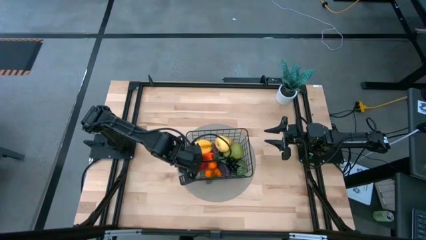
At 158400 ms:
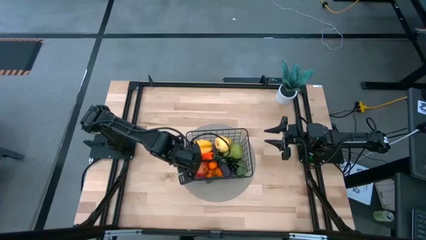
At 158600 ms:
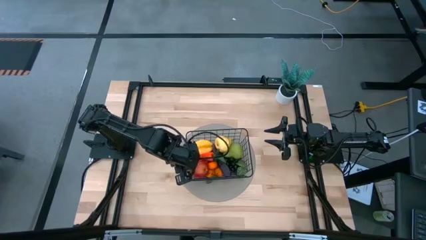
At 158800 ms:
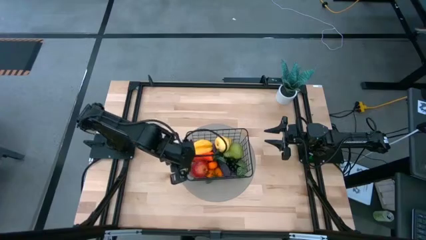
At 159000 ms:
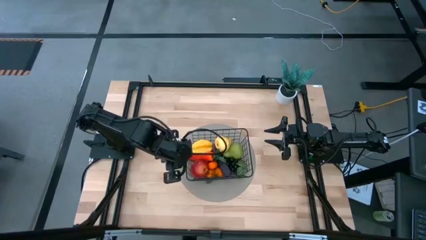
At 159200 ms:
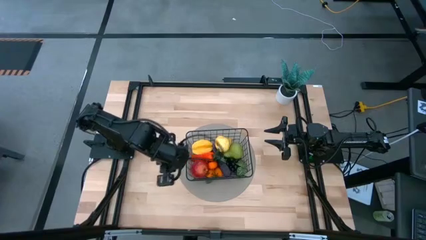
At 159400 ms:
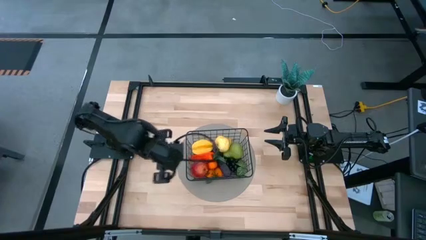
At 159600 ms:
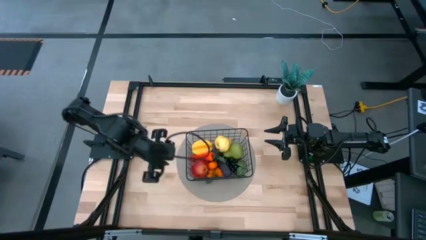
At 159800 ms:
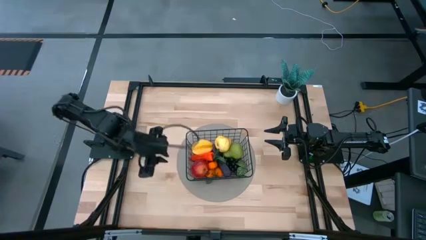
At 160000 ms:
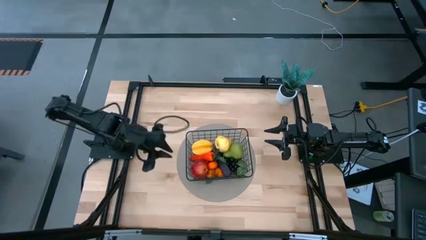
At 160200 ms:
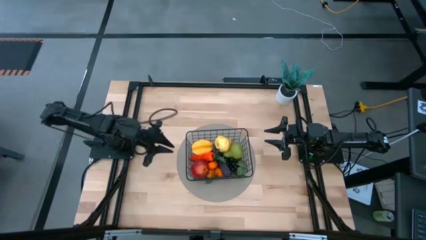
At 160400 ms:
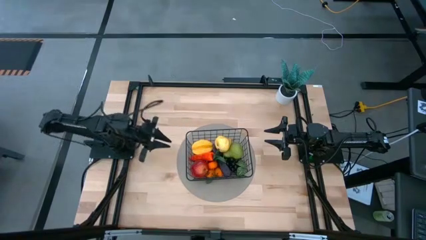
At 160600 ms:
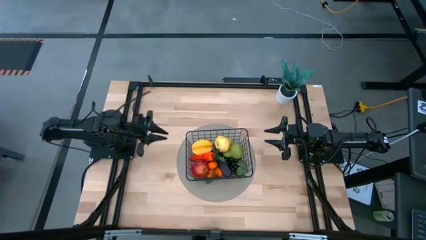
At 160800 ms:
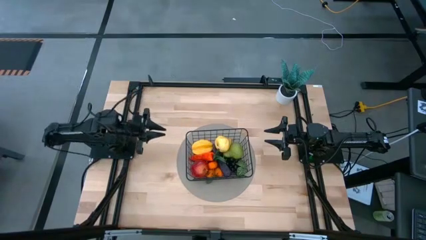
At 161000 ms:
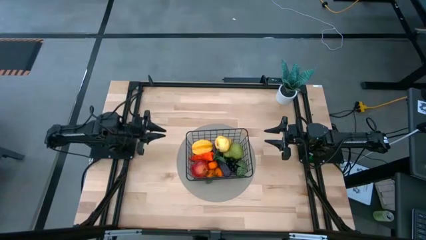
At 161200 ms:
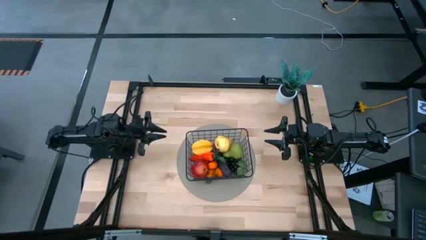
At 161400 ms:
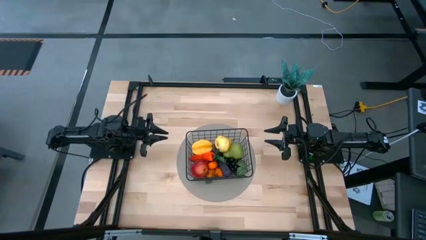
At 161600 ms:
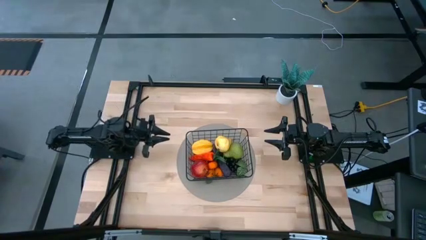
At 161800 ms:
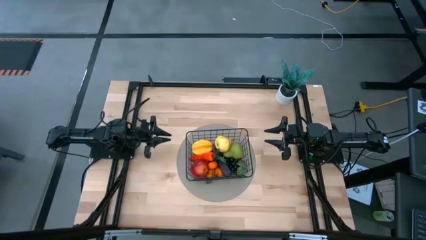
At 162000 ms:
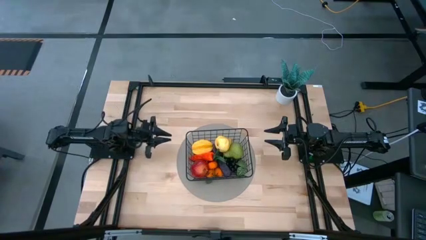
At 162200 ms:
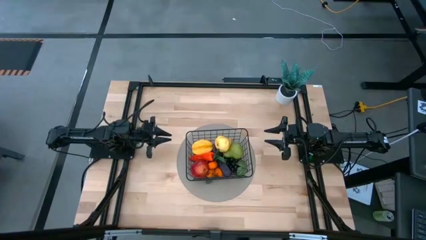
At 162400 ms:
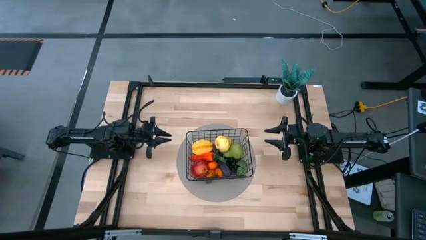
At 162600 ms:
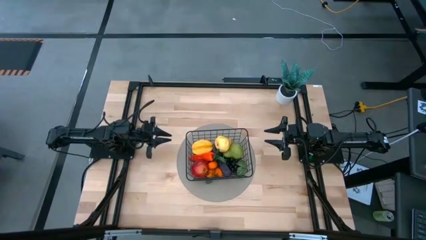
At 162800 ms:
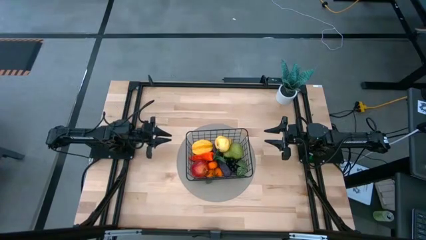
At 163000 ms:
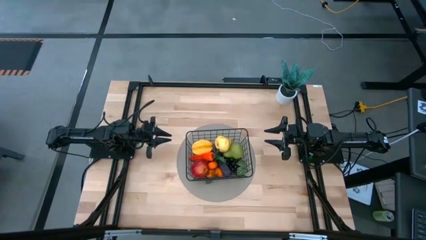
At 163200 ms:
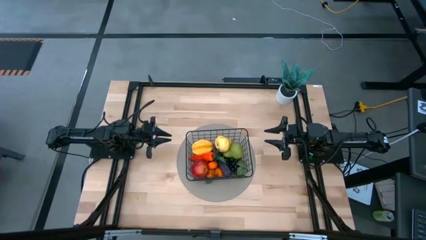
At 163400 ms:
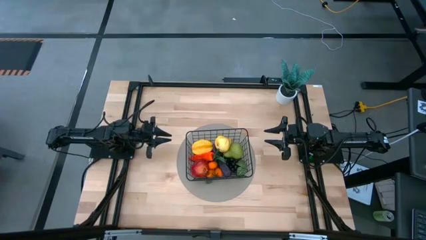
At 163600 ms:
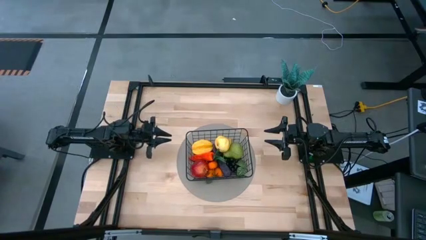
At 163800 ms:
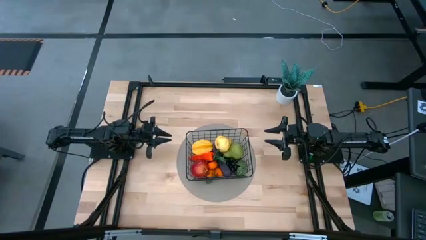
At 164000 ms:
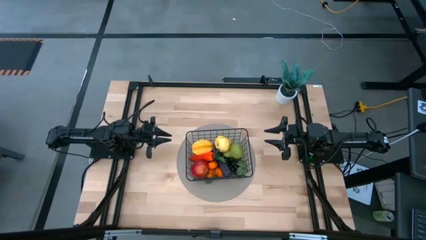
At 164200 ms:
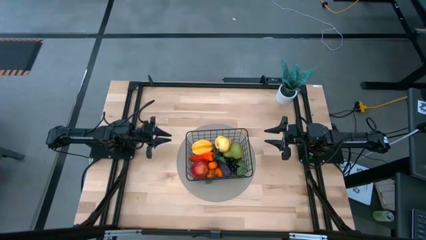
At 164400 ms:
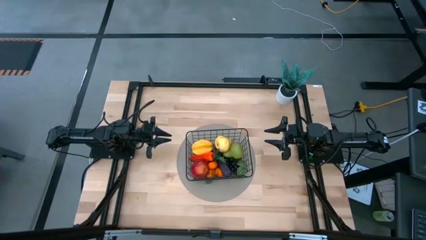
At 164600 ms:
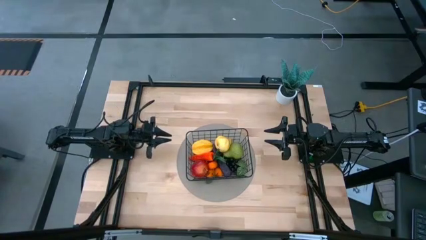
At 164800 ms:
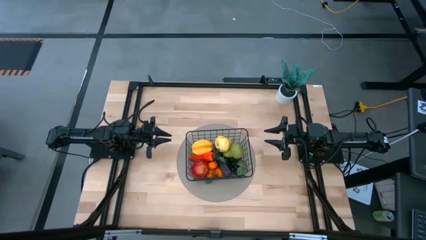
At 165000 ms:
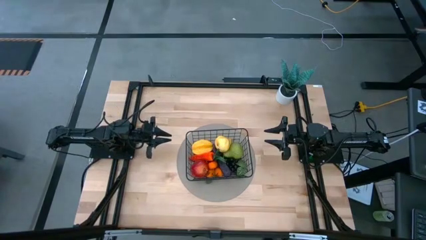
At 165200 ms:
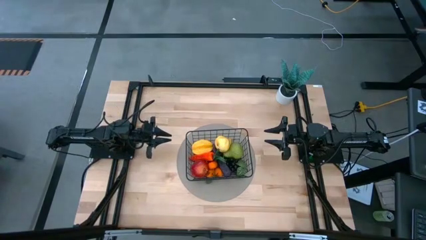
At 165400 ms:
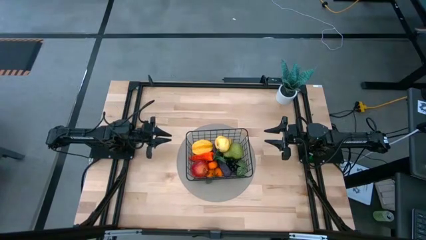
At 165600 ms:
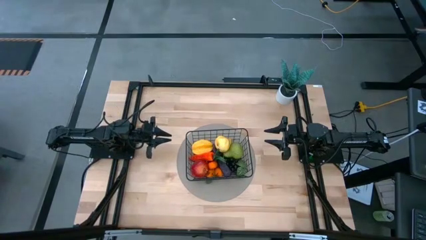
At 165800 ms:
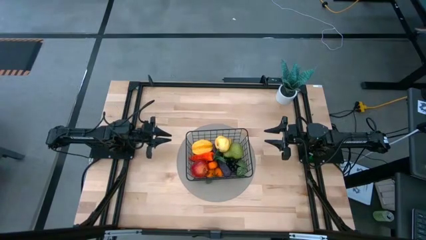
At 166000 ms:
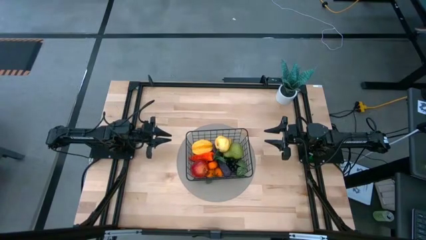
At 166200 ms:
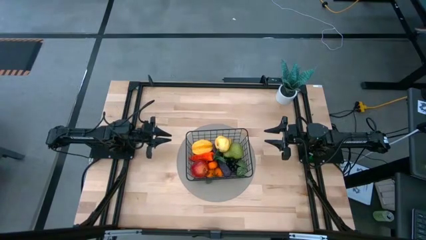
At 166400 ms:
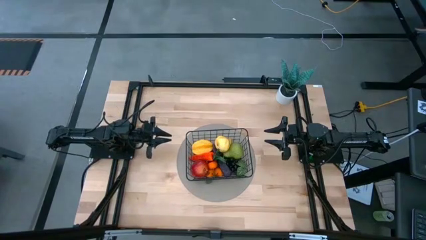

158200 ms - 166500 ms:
Task: Build produce basket
Return to Home Position

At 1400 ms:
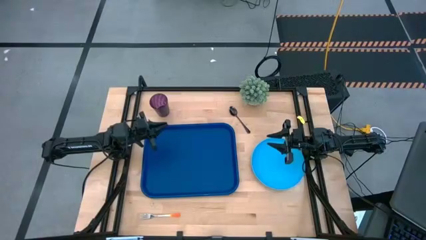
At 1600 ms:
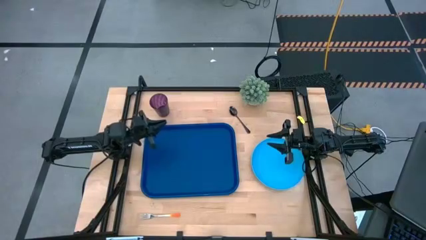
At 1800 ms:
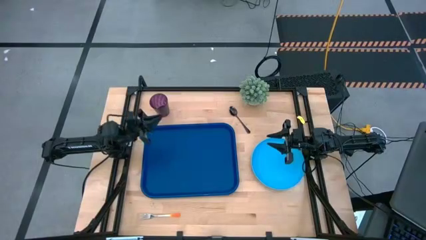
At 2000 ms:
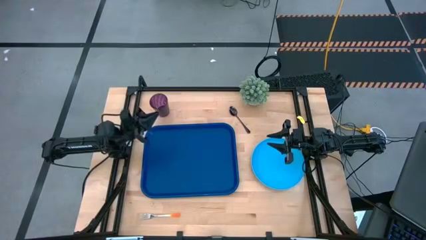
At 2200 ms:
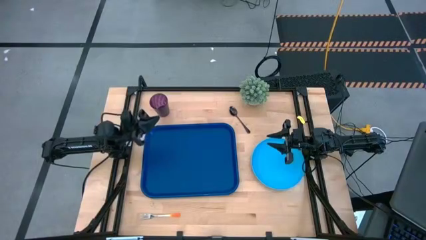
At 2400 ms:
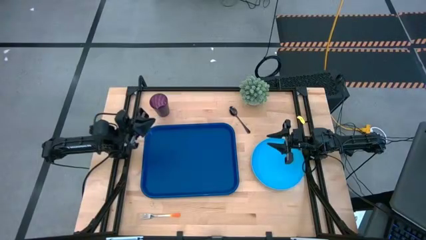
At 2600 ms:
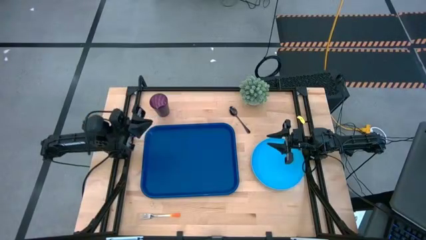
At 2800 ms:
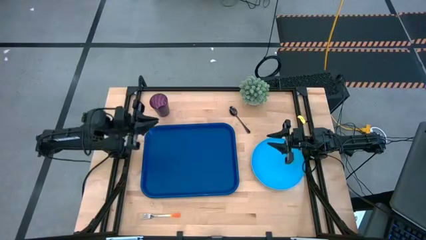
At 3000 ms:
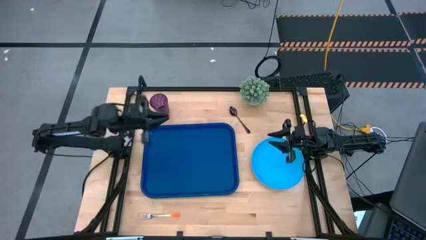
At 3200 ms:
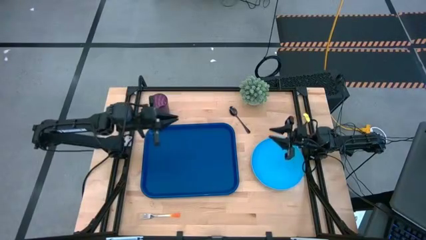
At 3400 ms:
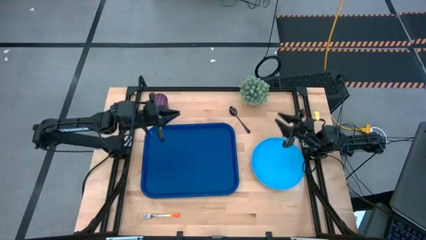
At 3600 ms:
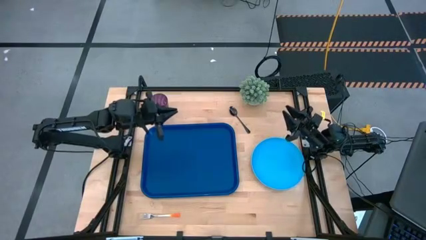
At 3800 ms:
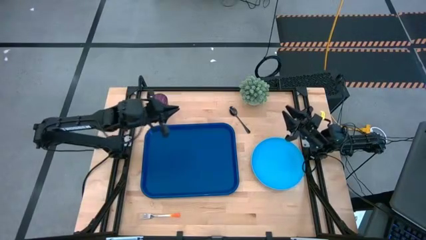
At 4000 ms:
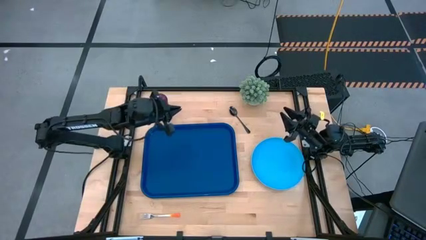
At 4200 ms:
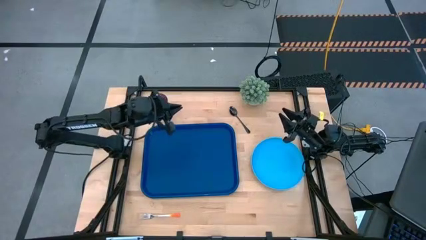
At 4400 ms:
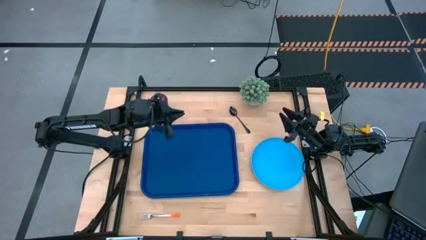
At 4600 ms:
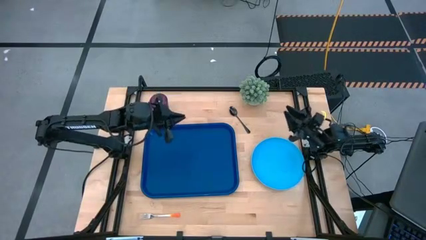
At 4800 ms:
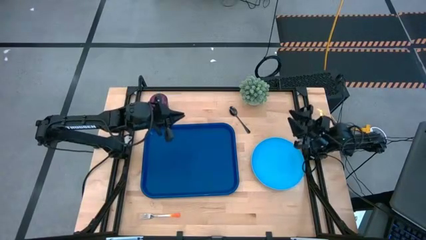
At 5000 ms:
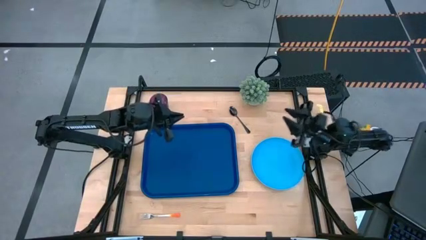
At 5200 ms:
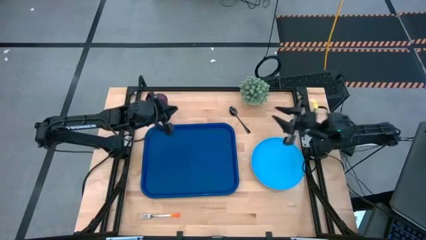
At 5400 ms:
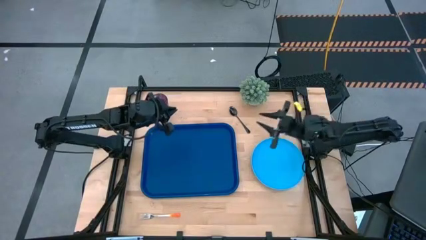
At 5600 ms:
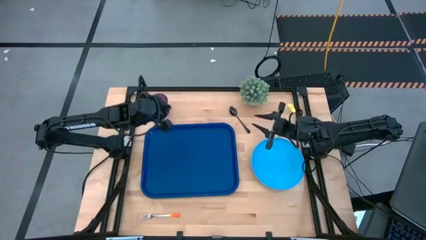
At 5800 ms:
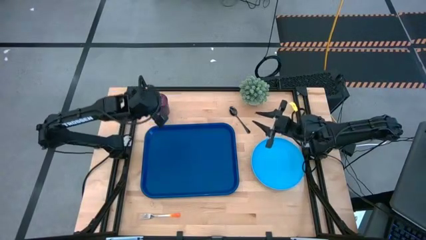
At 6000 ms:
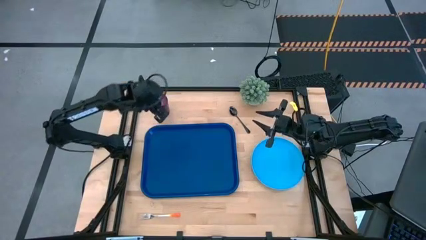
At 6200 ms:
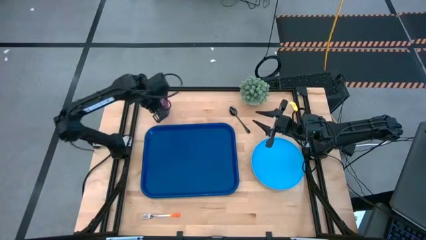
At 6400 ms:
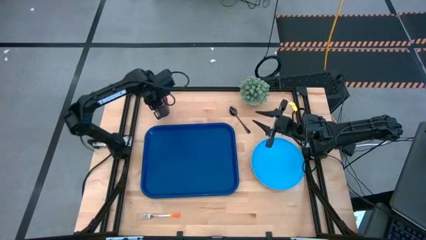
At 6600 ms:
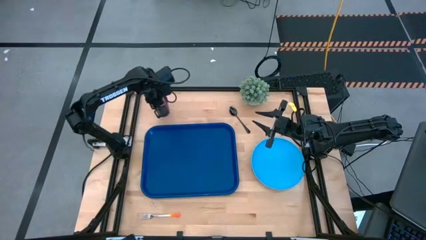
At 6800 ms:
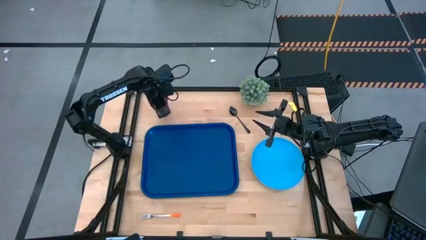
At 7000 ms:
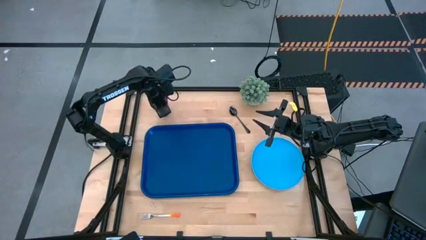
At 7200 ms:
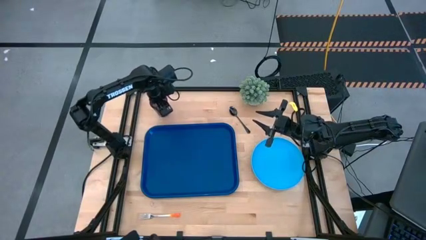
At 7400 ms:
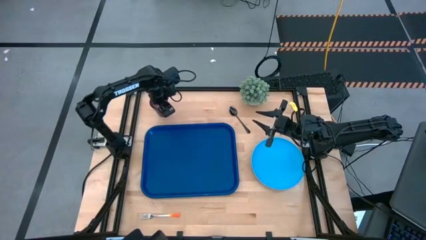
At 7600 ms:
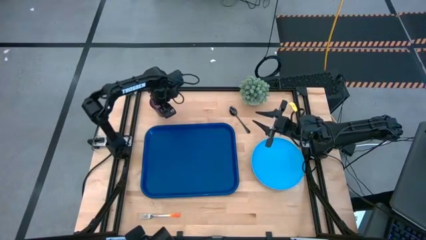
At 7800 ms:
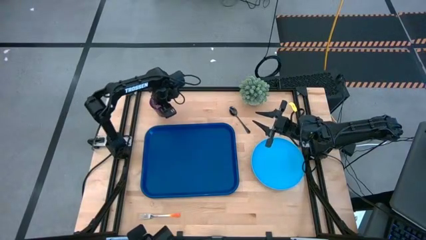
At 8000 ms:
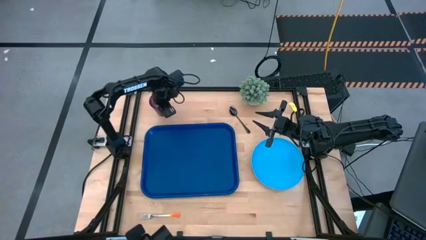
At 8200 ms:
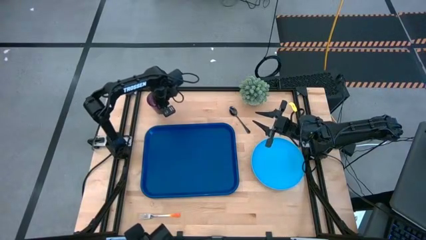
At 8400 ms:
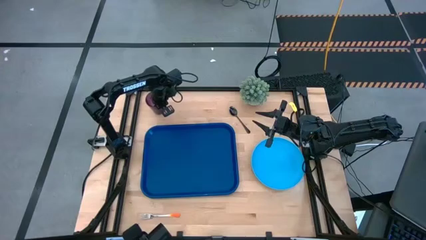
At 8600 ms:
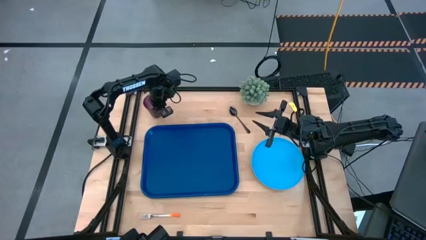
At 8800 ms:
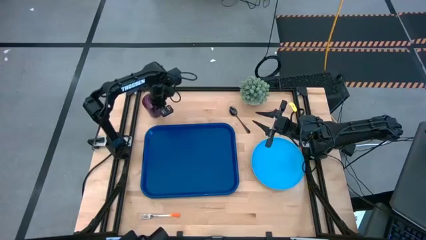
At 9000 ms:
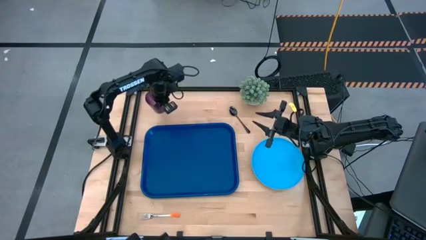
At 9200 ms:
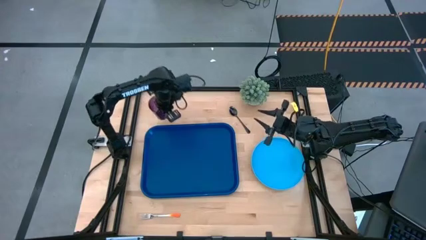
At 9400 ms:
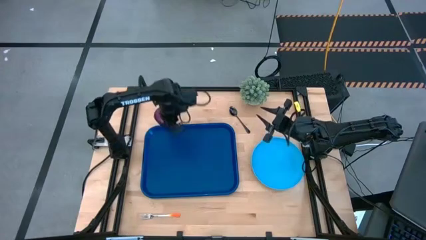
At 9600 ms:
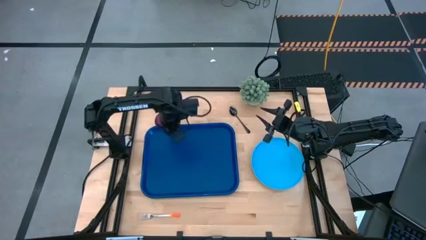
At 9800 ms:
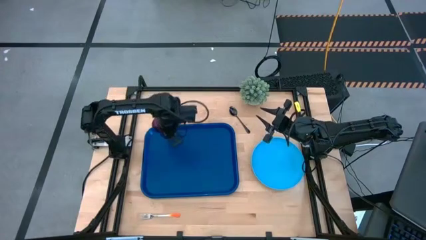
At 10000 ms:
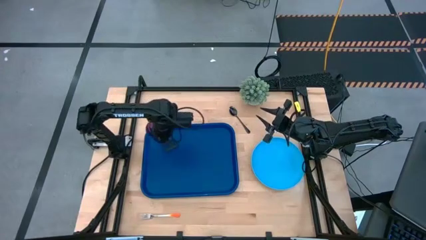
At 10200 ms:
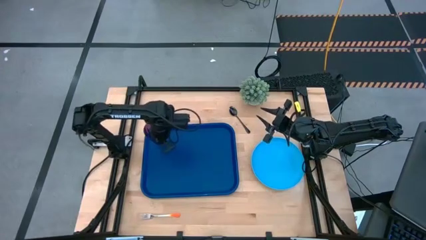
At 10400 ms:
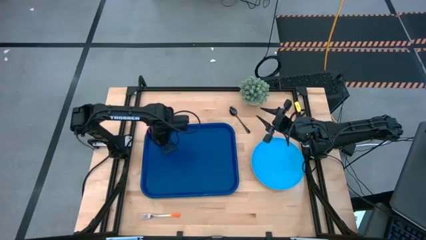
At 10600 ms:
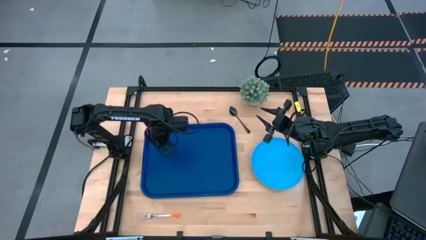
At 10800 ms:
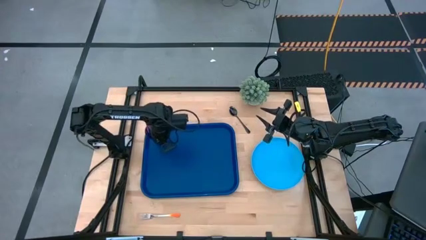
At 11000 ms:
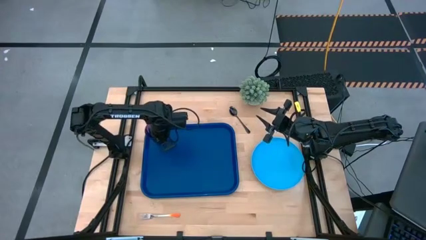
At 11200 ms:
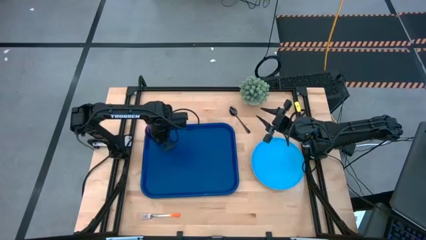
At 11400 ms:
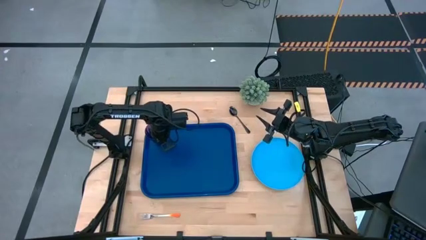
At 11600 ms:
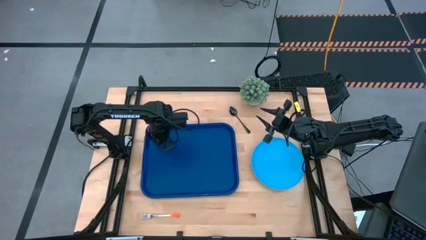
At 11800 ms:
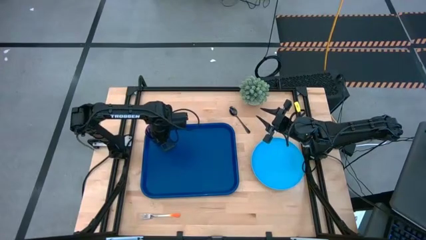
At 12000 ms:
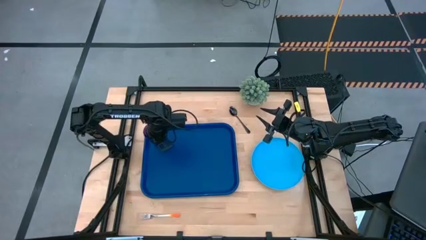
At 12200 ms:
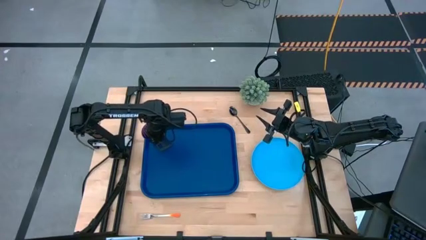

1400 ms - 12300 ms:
Task: Pick and place plate/cup/fork/spoon on tray
Put the purple glass on the top left of the dark blue tray
